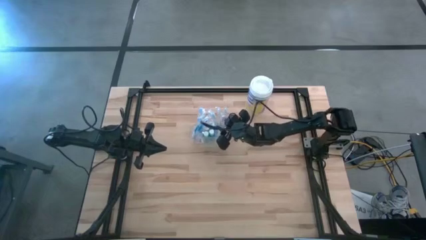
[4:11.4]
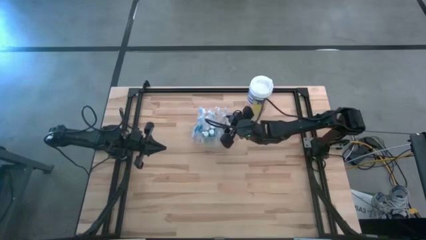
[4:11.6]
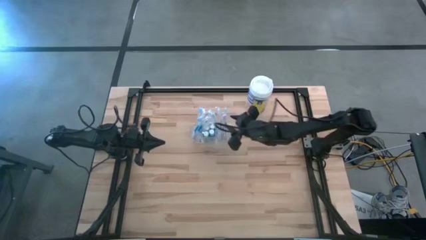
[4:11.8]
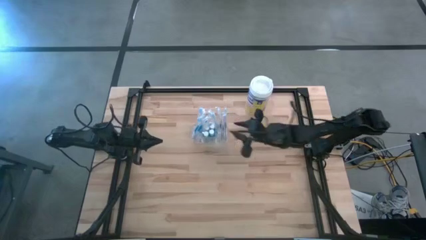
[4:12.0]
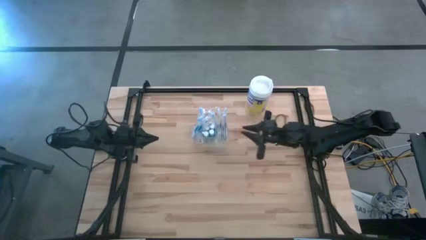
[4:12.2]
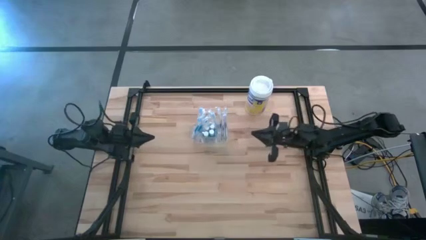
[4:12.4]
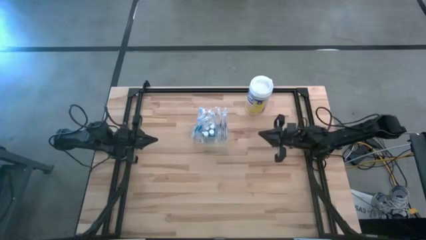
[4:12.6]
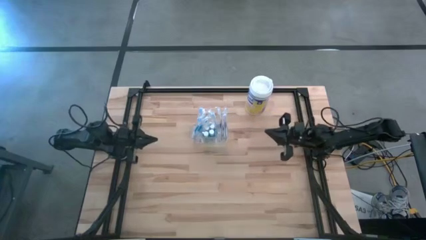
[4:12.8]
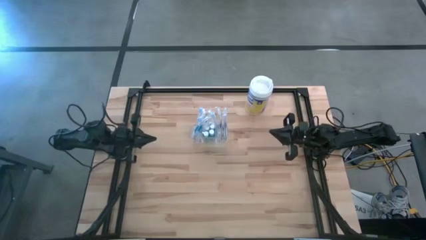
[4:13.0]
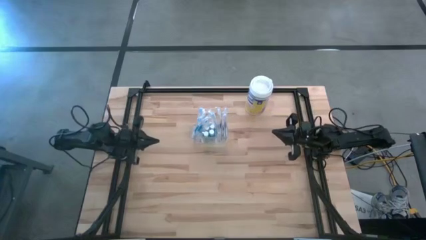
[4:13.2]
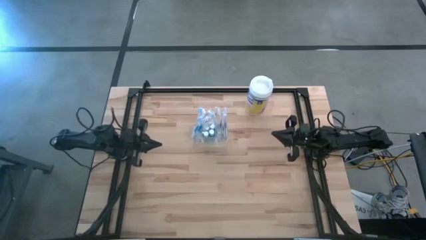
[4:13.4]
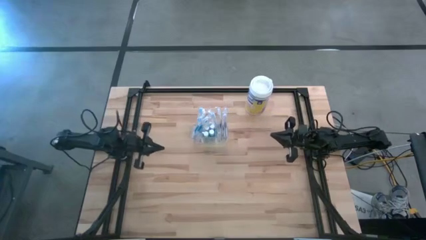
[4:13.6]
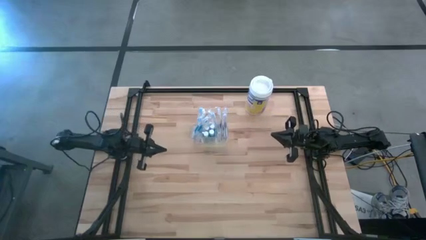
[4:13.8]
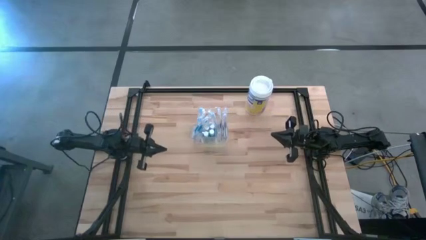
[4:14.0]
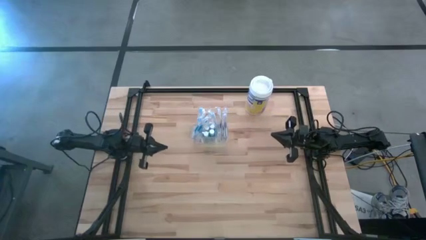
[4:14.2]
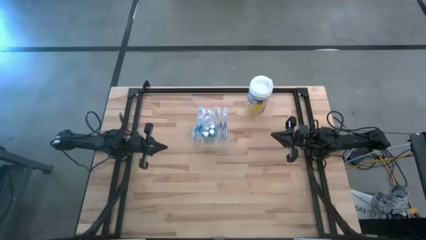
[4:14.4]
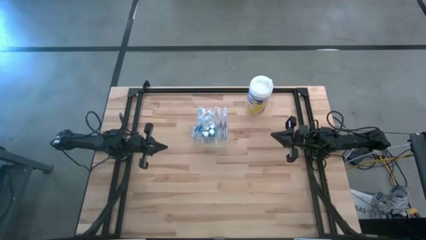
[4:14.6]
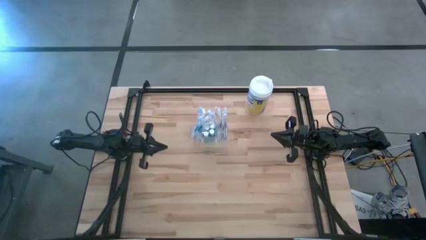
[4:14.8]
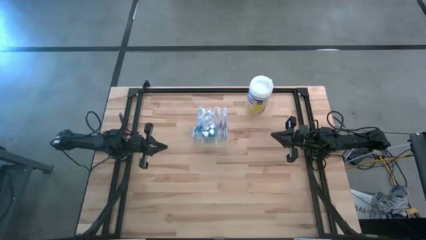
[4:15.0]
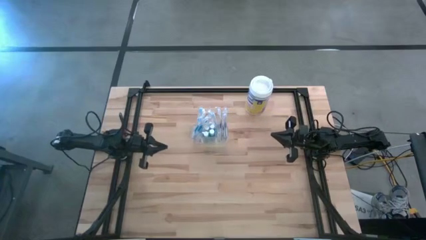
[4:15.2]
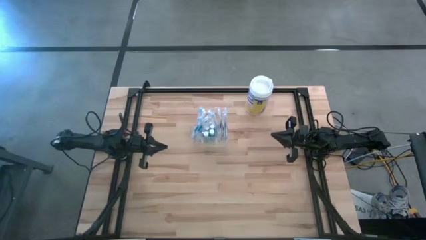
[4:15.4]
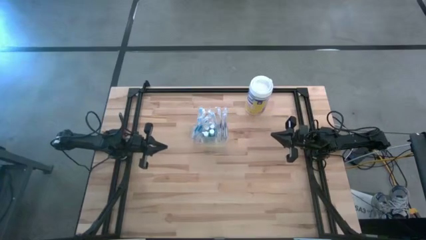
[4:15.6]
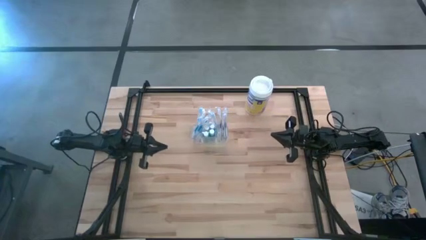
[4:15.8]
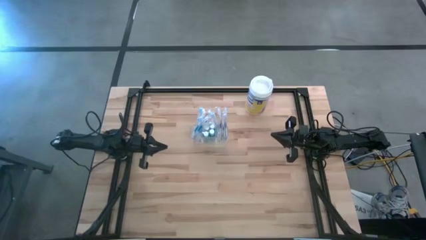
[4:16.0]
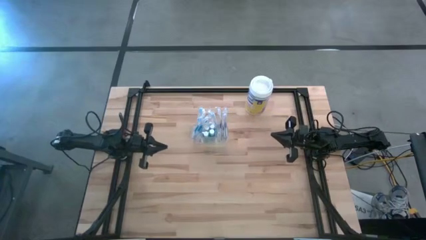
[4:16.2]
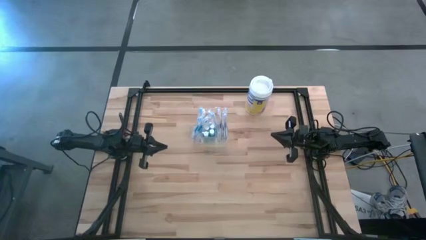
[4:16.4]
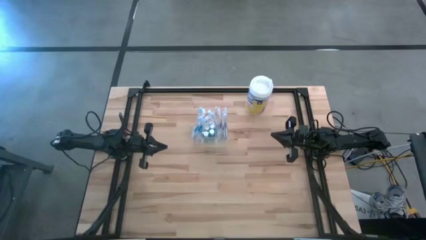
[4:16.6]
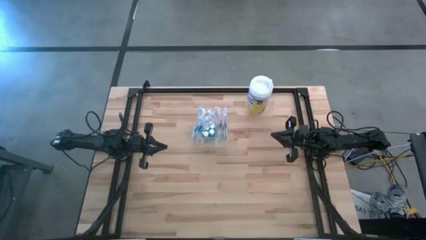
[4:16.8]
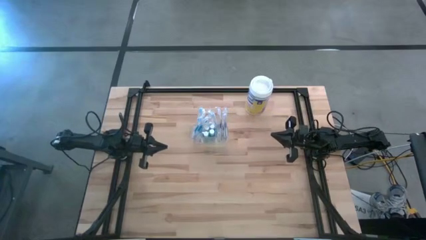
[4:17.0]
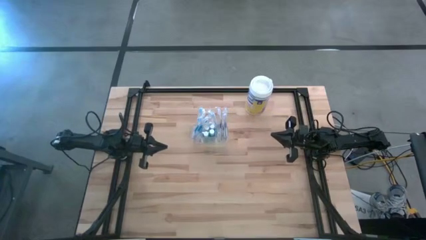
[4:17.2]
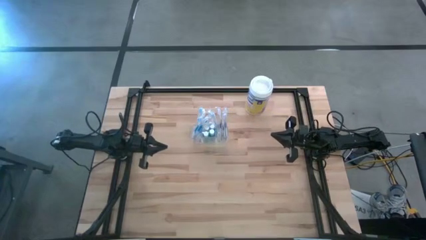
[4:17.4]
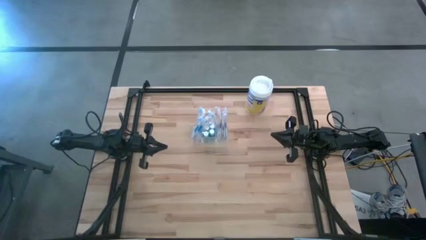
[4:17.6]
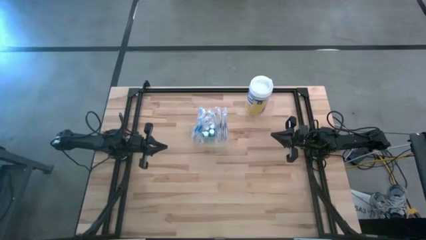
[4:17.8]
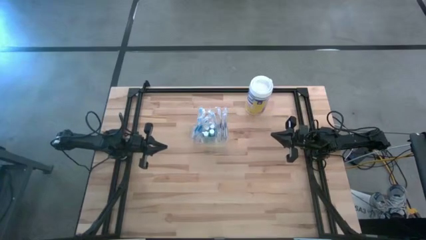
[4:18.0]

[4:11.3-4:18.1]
Task: Pick & Place toothbrushing station
Return to Home Position

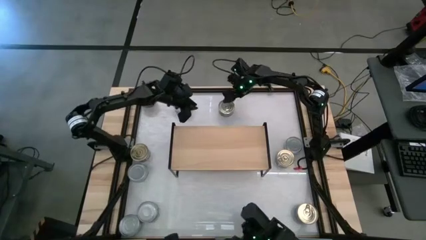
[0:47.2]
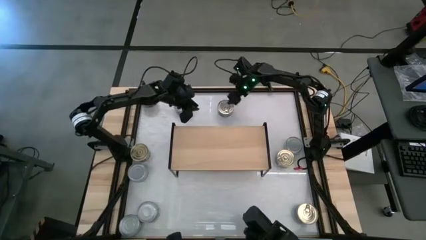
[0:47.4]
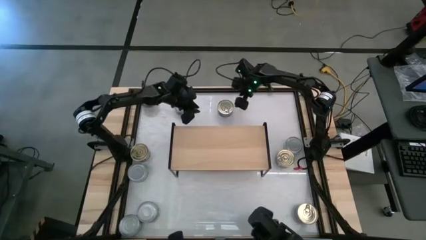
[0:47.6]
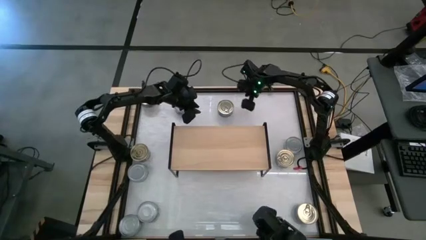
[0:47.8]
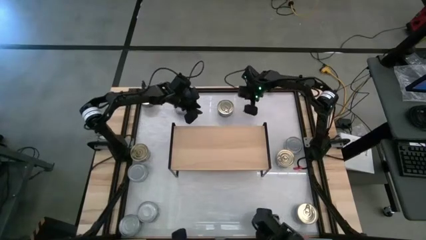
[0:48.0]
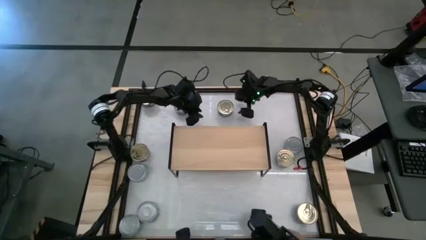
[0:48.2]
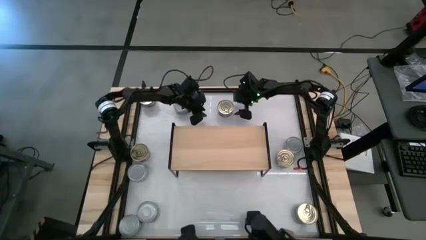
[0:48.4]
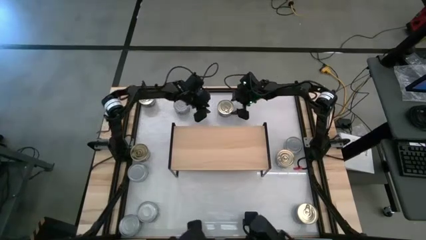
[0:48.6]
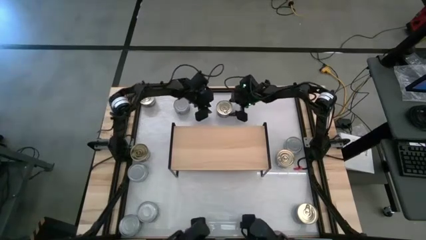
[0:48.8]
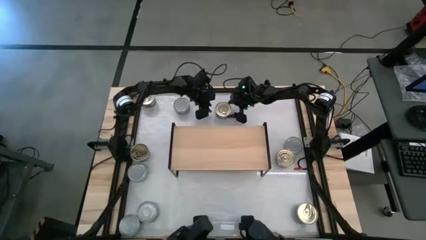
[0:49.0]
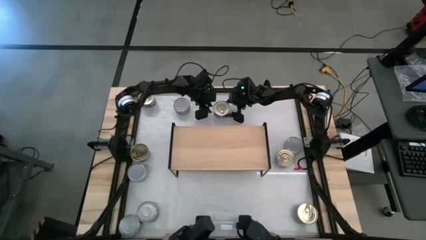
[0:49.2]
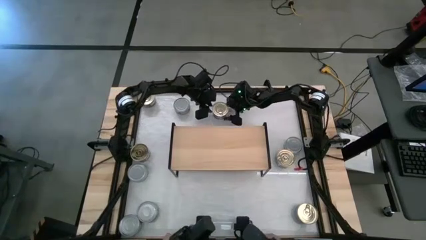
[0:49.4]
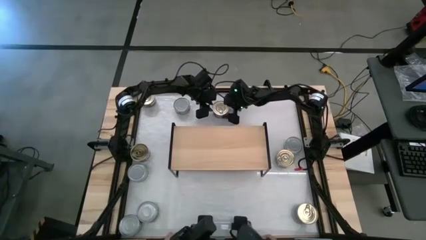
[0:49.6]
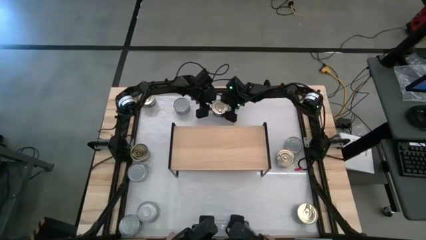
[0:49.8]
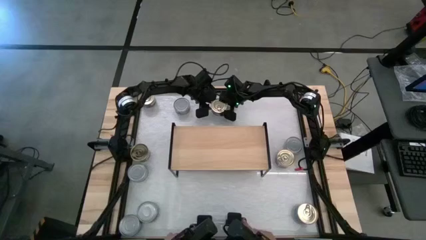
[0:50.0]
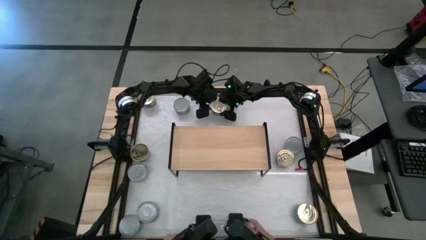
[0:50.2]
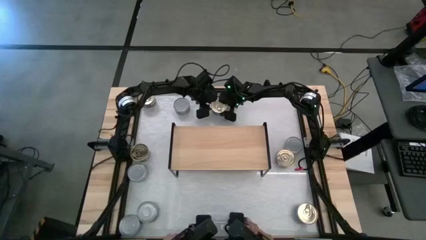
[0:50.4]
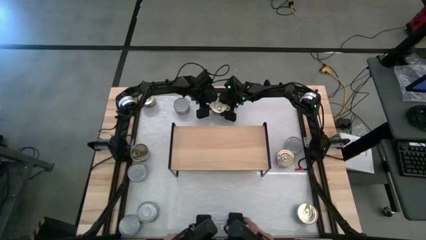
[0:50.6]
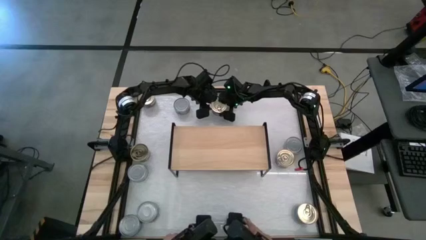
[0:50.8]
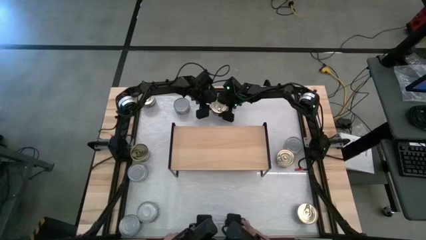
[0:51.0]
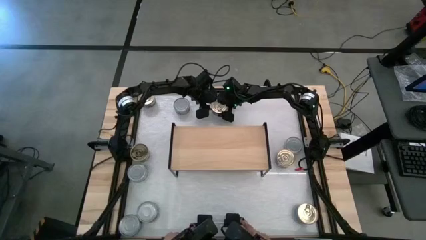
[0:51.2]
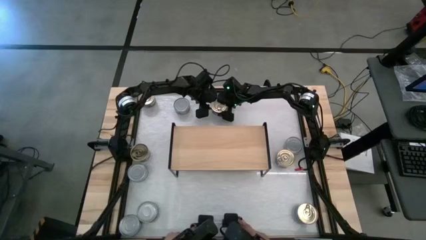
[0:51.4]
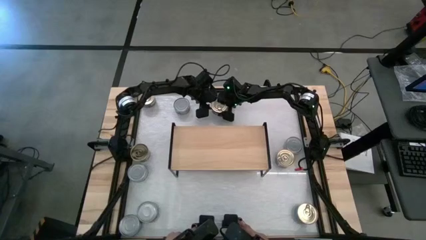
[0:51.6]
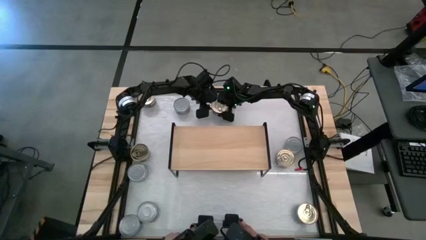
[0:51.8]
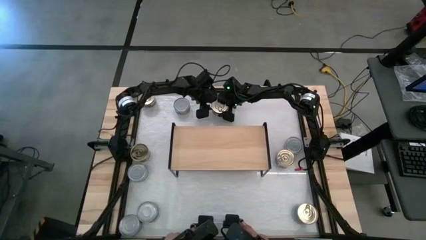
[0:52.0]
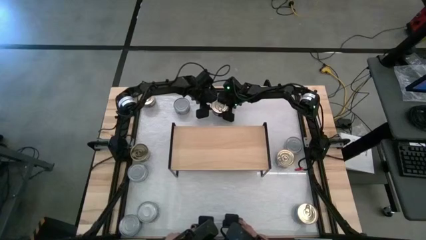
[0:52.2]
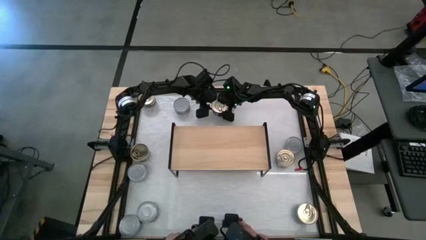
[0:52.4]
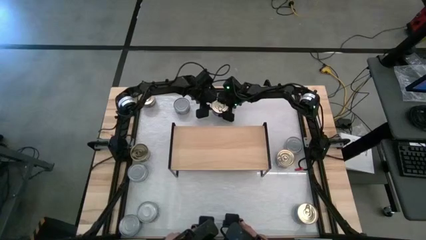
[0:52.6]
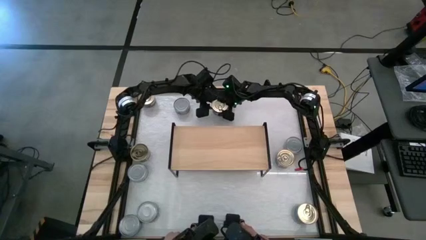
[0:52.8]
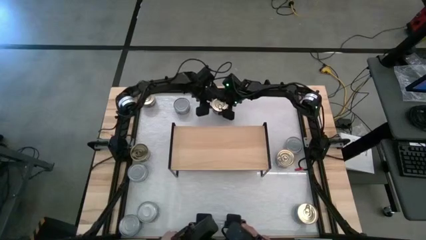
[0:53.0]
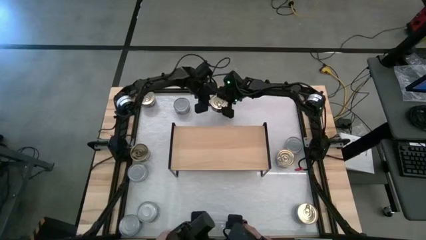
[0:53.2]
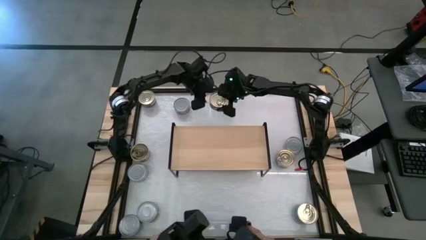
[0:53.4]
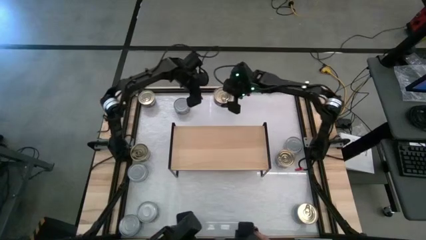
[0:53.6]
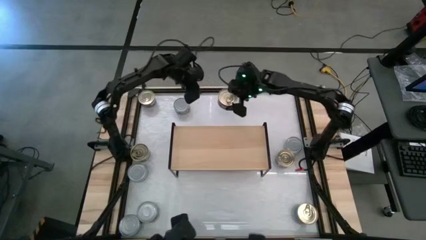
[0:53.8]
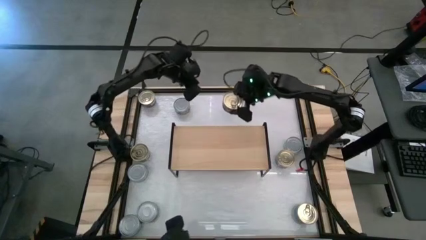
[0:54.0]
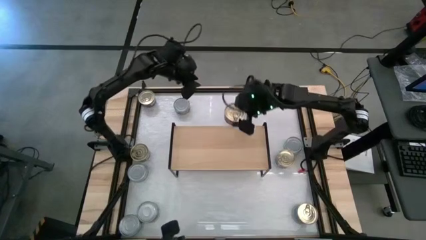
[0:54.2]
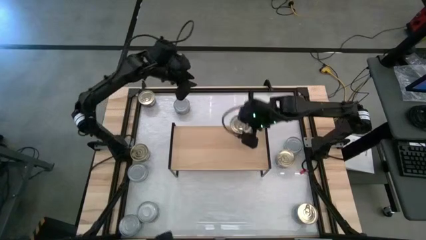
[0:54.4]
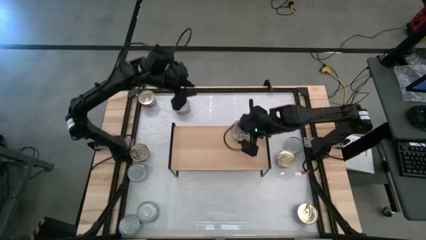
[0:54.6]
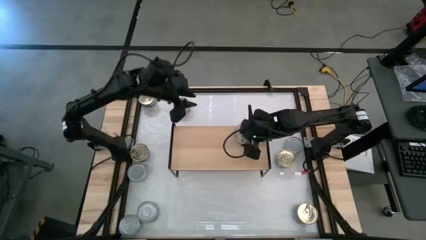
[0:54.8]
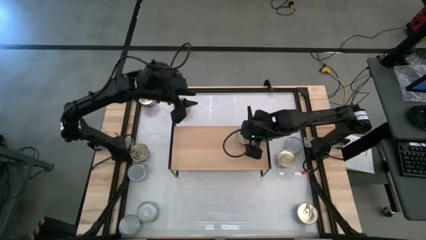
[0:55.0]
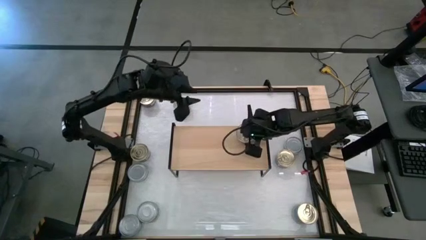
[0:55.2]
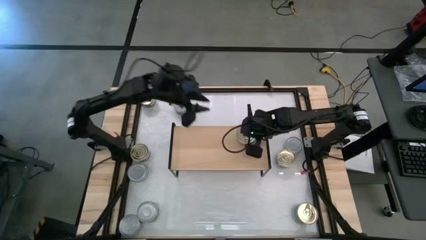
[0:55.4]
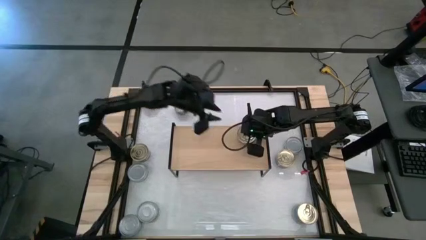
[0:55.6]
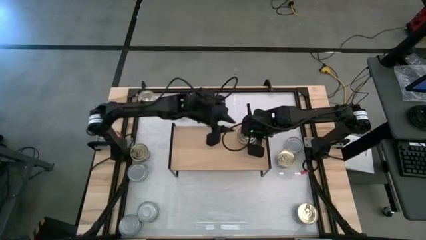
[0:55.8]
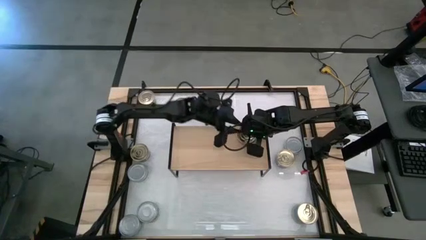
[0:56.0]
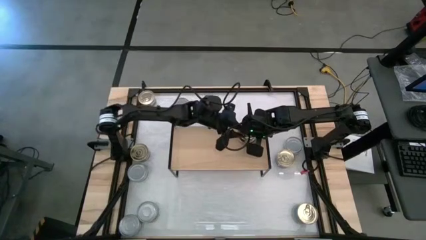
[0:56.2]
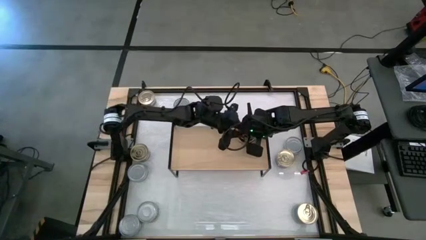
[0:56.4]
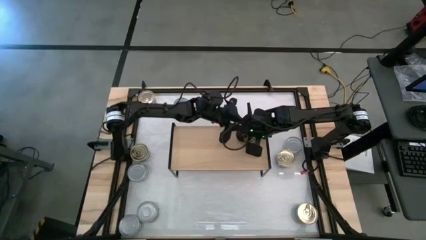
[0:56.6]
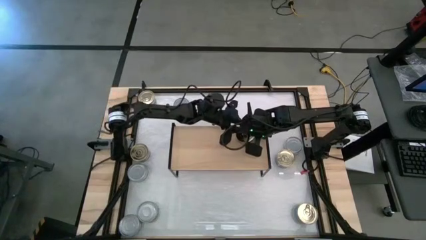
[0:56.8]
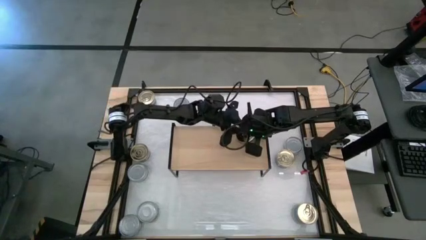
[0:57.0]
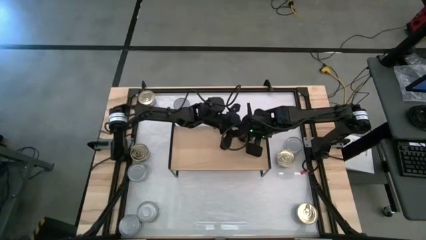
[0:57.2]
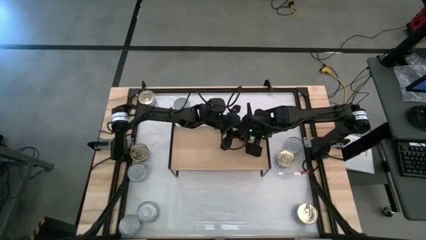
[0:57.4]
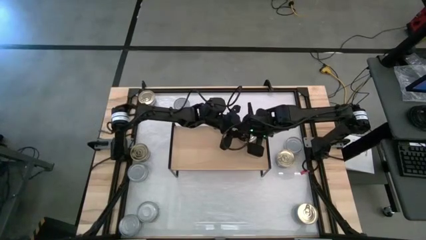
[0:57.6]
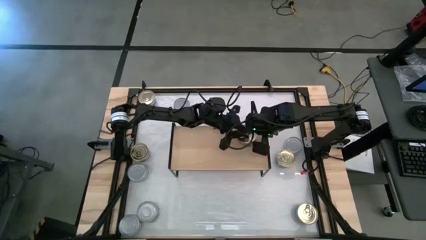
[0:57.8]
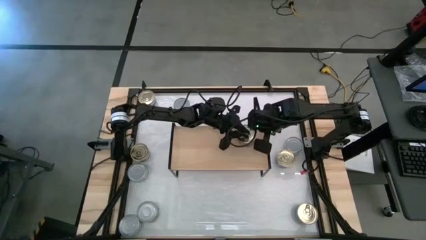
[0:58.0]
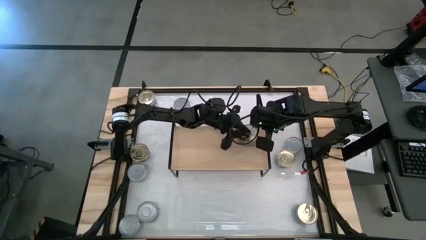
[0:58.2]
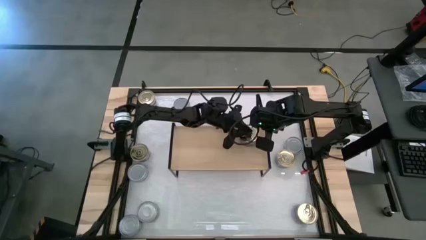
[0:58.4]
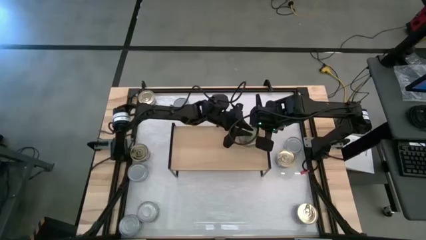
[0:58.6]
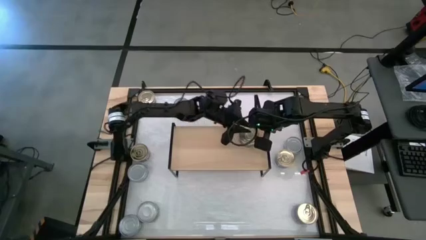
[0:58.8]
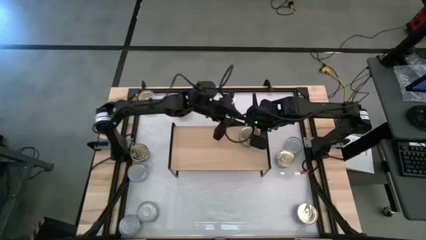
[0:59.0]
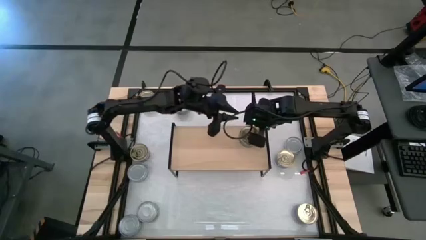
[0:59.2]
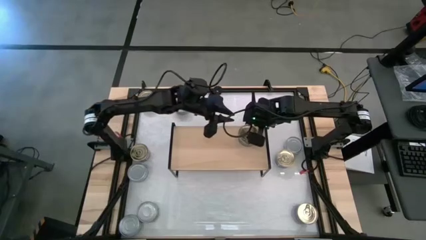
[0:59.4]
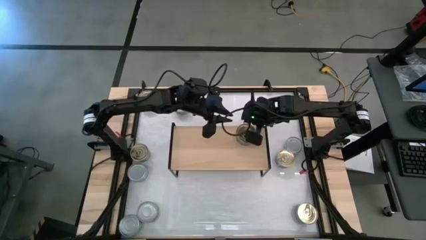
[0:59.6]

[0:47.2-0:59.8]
Task: Stack canned seafood by type on shelf
Put the blue-pink tuna can on the shelf
